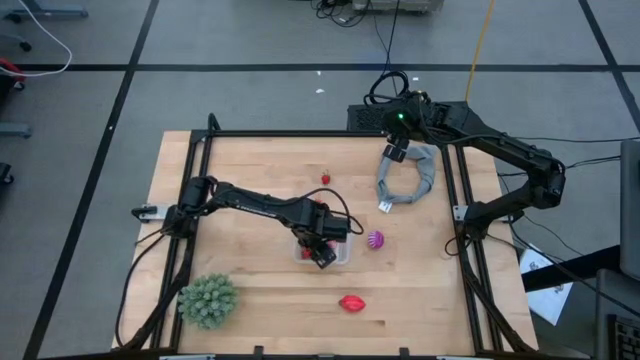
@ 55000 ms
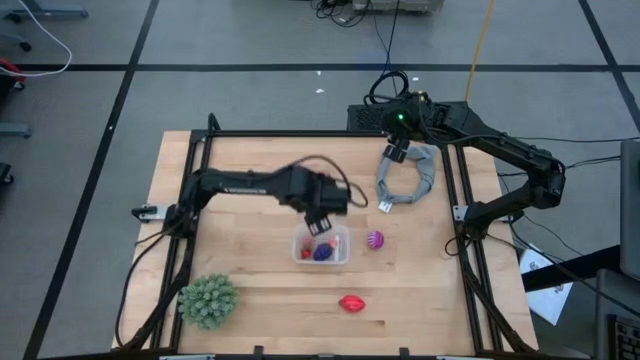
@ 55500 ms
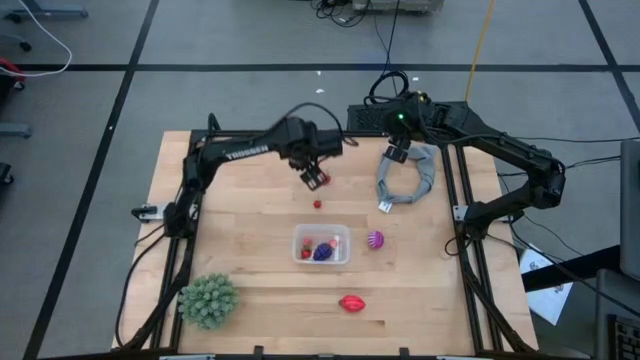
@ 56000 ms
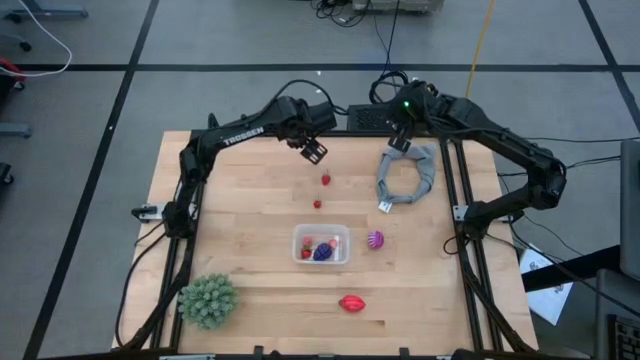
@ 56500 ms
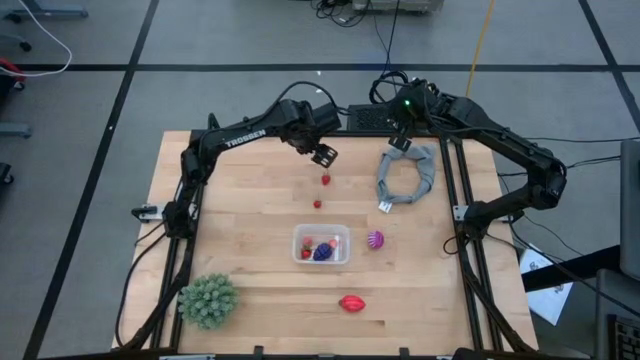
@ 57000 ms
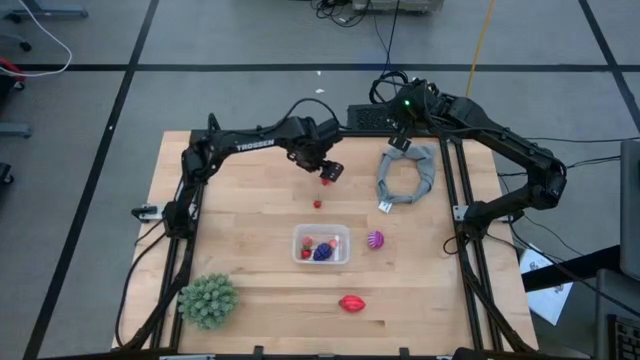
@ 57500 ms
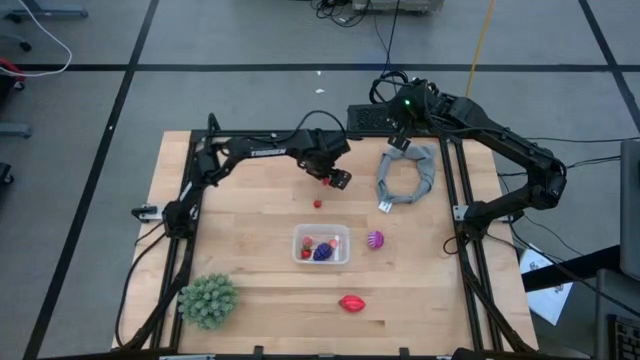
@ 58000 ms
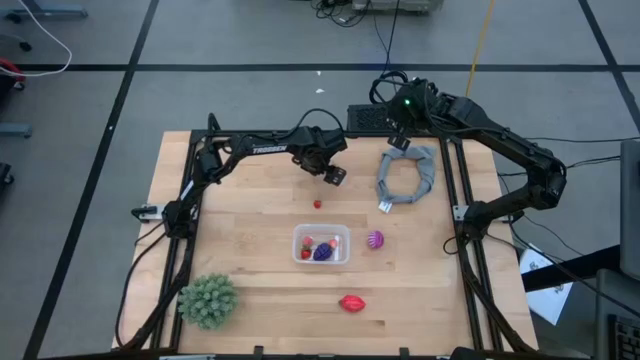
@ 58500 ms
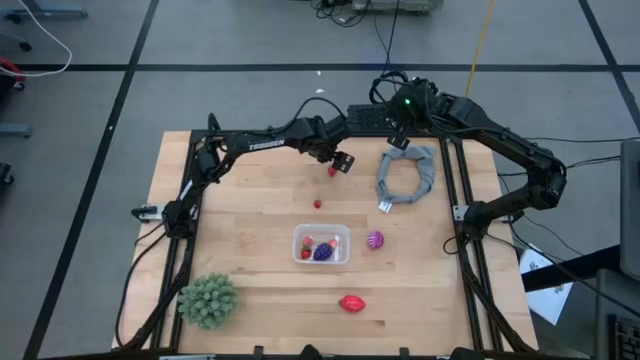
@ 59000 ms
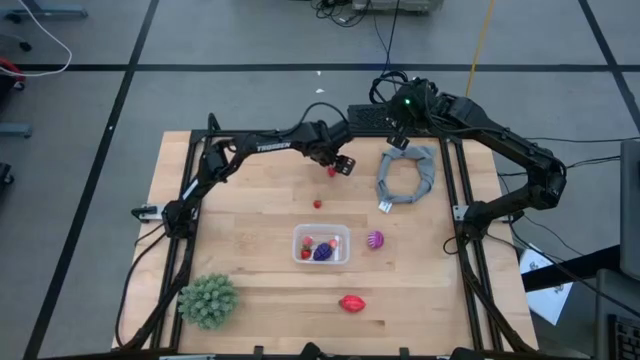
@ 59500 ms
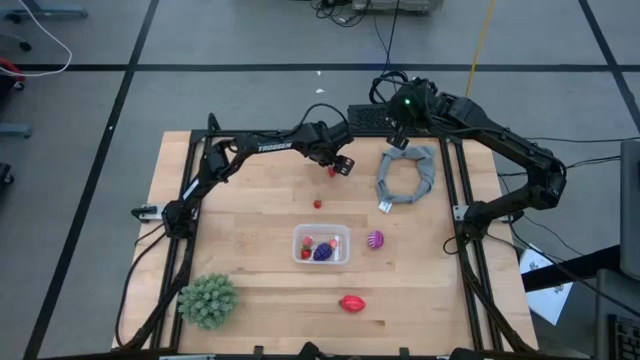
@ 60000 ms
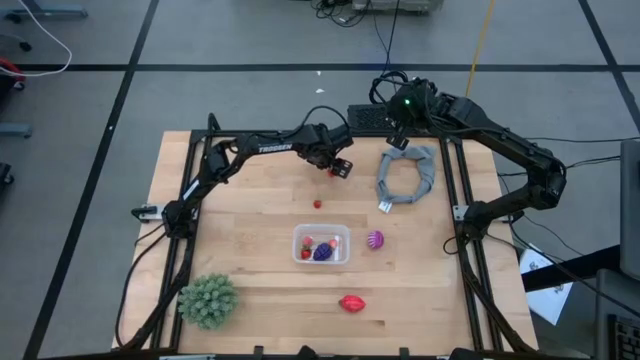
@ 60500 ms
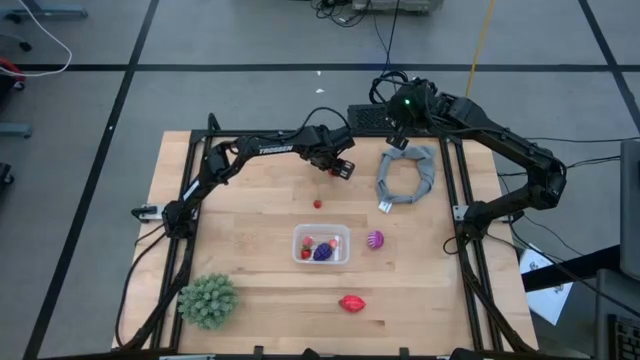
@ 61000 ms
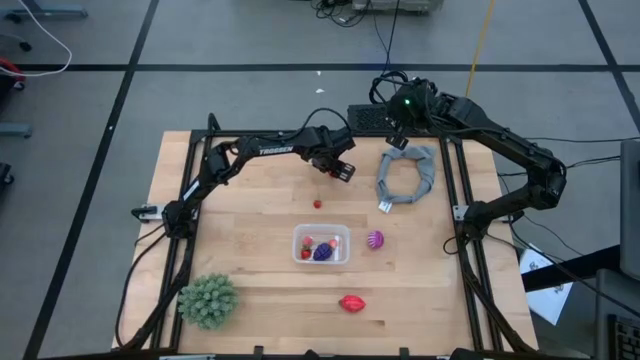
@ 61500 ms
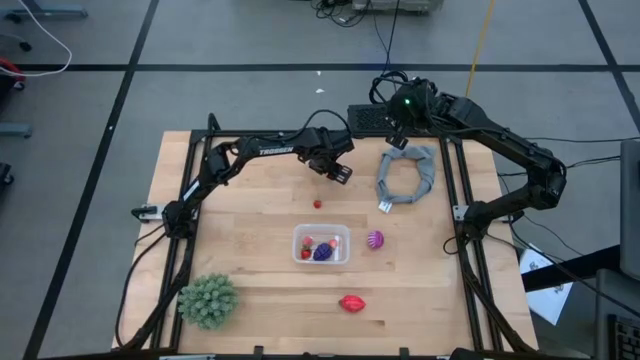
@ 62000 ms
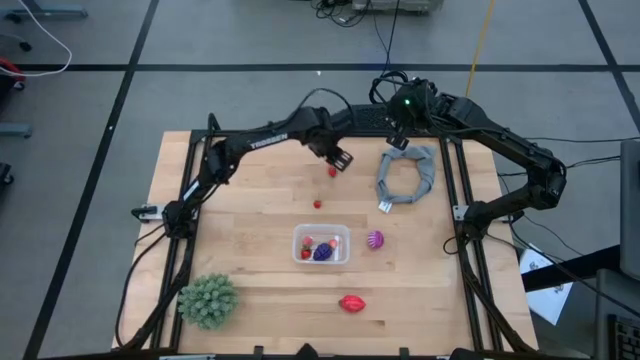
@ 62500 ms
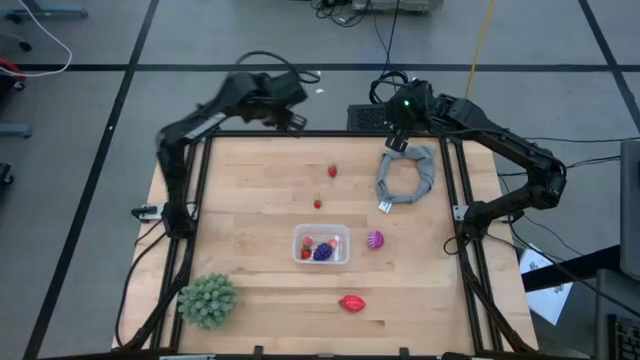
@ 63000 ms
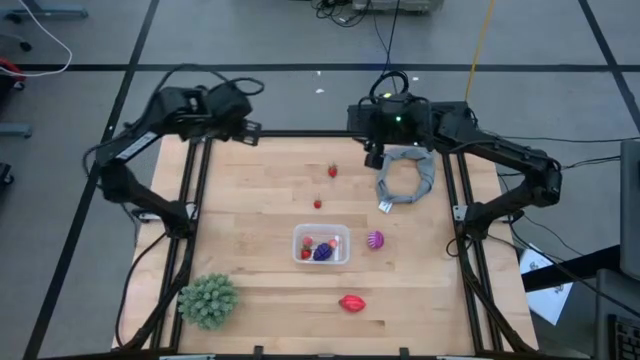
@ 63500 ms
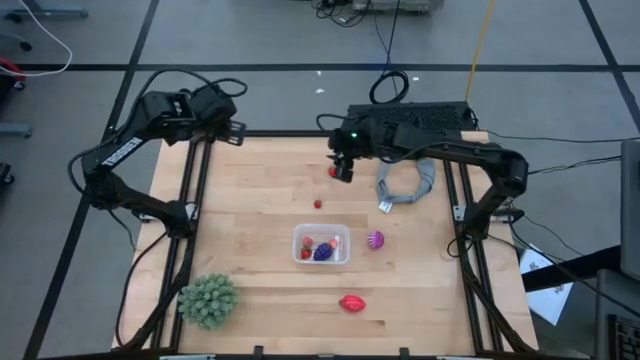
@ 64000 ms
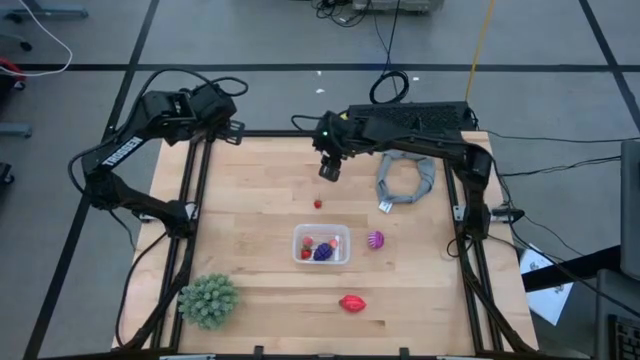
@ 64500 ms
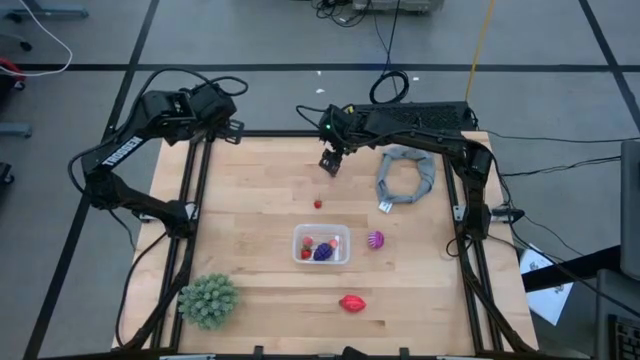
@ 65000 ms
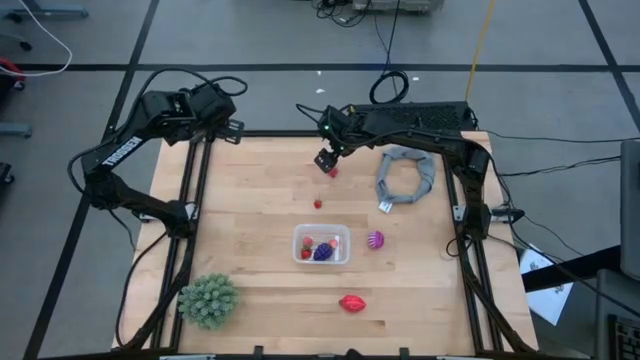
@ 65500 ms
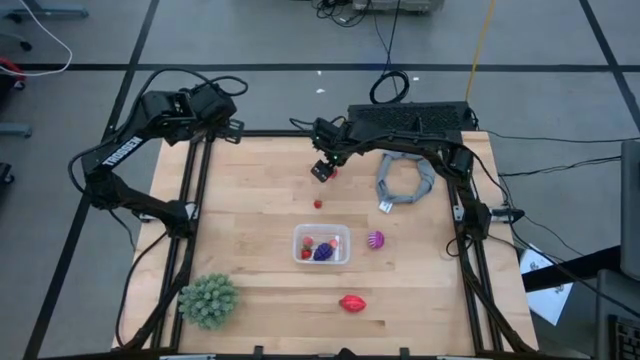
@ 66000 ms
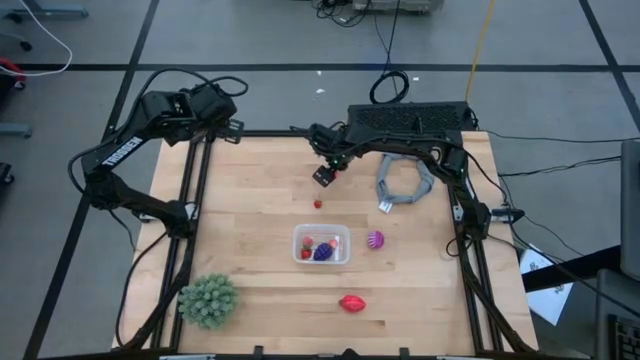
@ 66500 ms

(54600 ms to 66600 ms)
Task: Pick and placing Produce into tupperware
Put the top strawberry into the bin

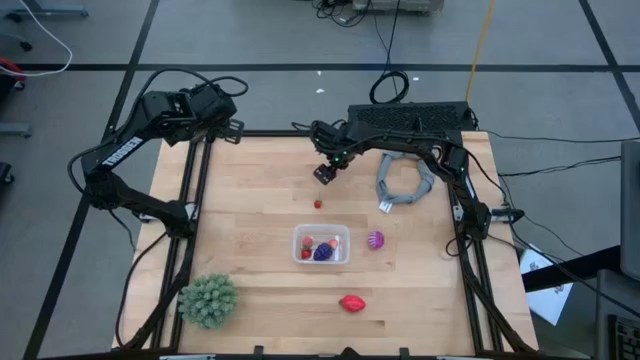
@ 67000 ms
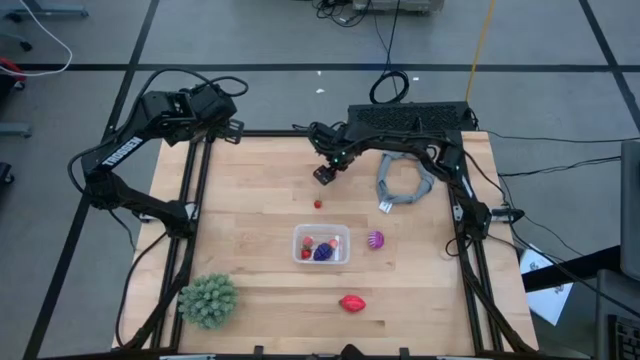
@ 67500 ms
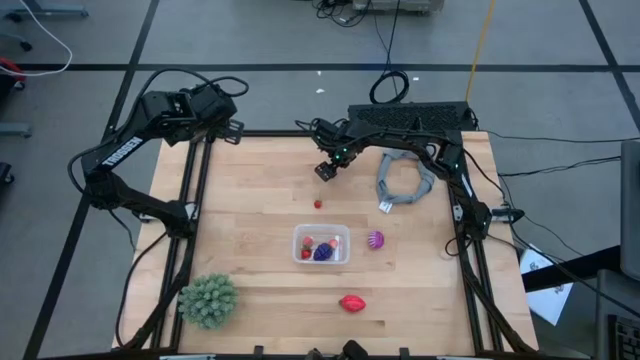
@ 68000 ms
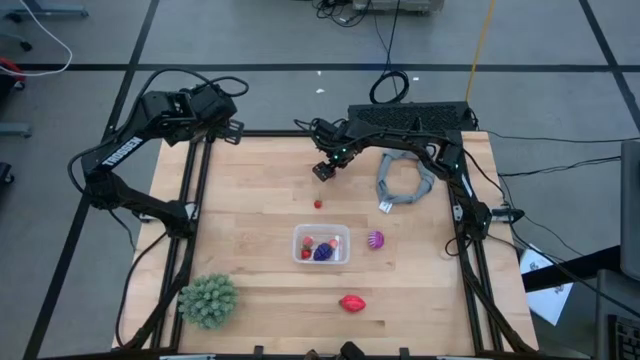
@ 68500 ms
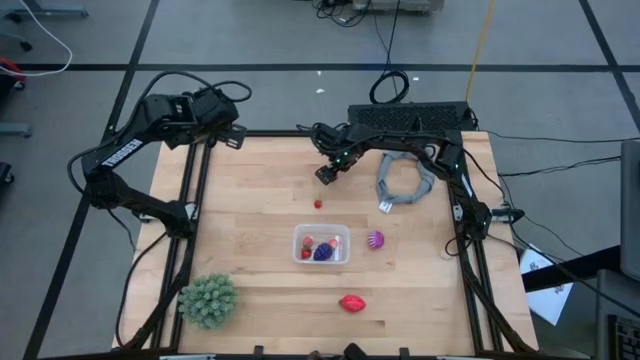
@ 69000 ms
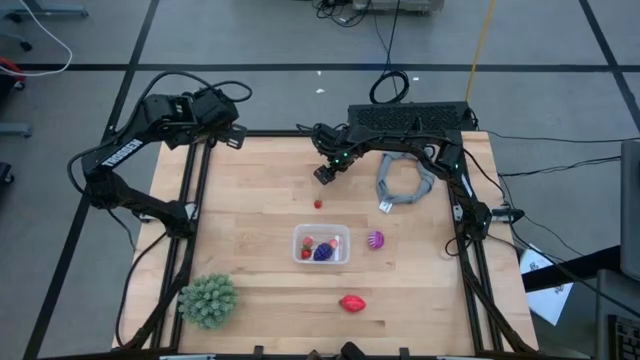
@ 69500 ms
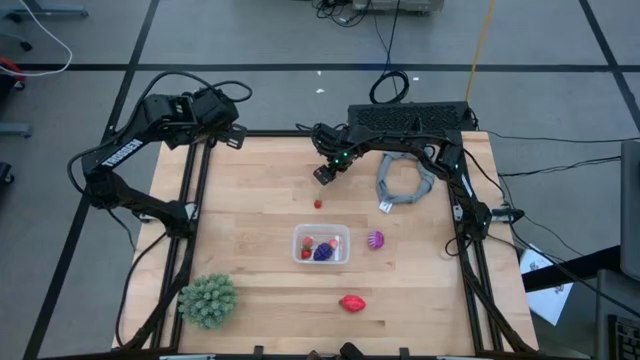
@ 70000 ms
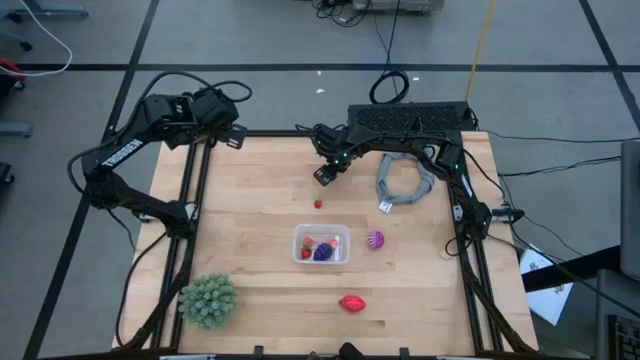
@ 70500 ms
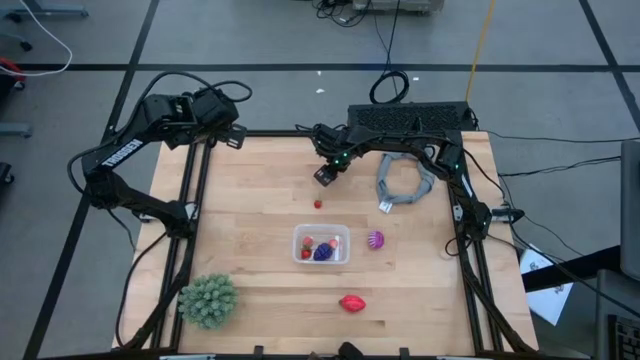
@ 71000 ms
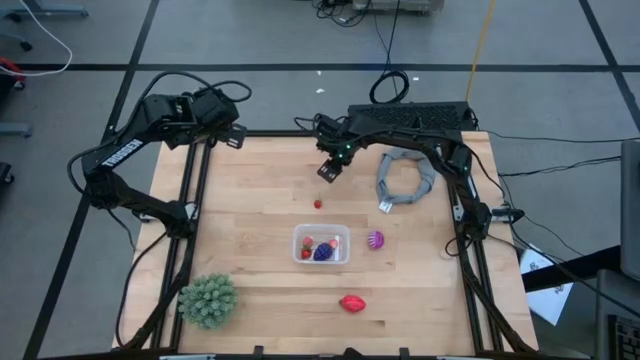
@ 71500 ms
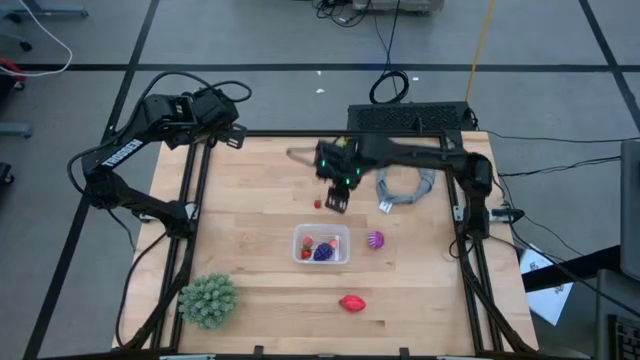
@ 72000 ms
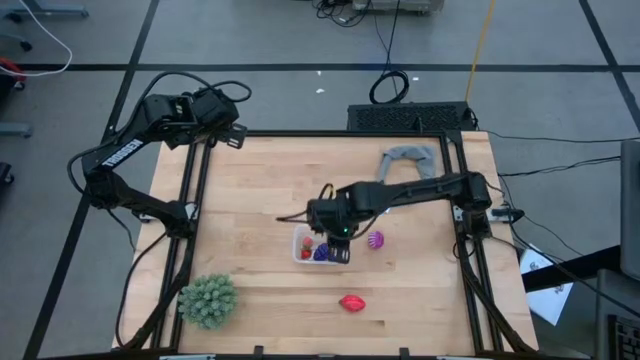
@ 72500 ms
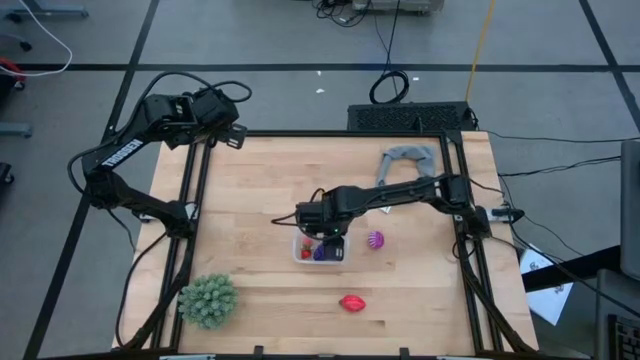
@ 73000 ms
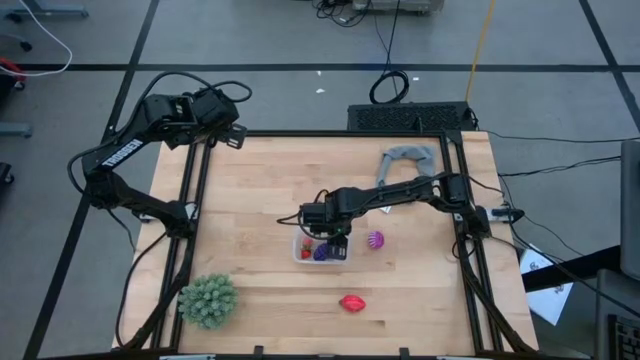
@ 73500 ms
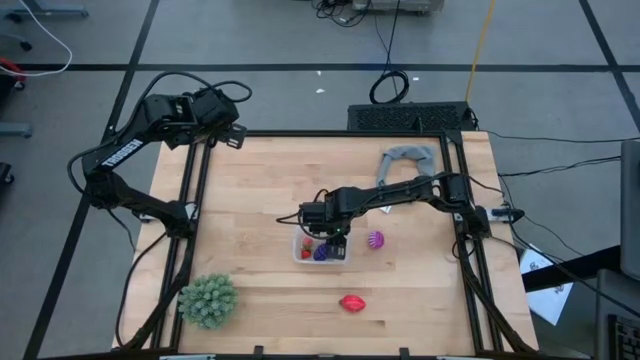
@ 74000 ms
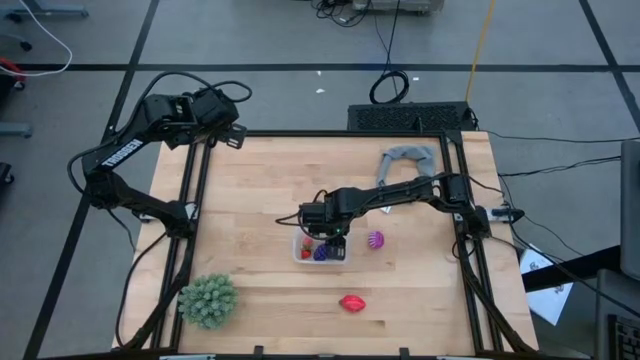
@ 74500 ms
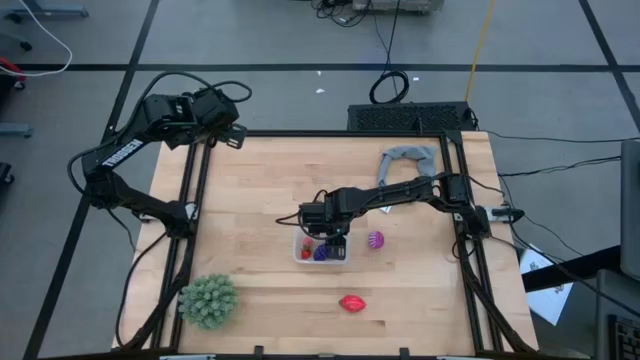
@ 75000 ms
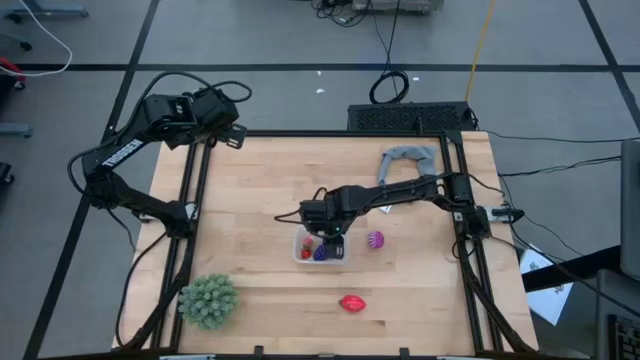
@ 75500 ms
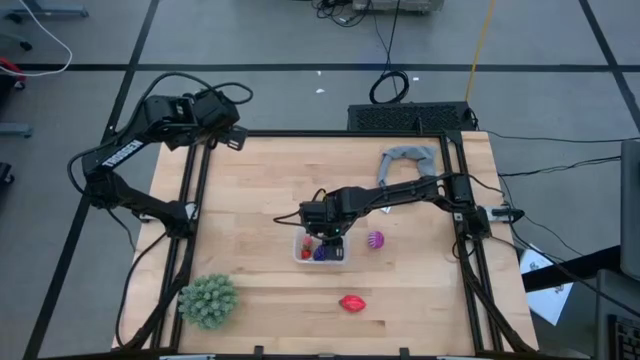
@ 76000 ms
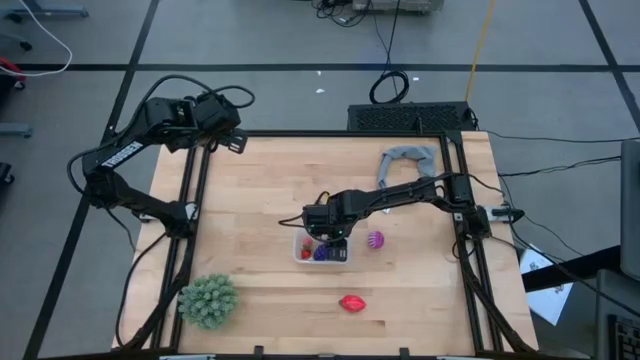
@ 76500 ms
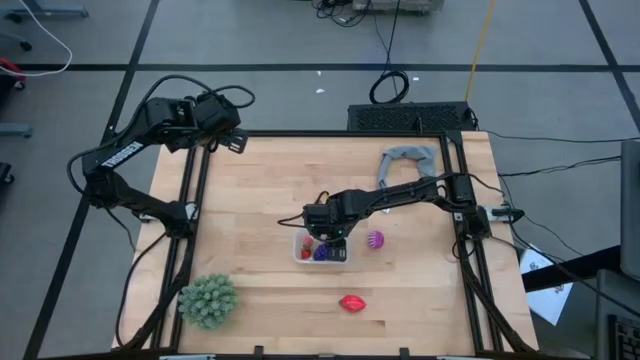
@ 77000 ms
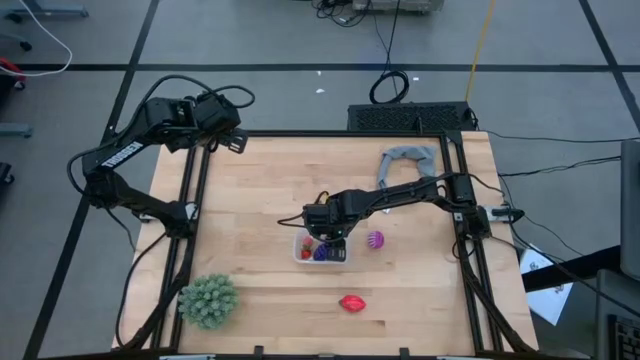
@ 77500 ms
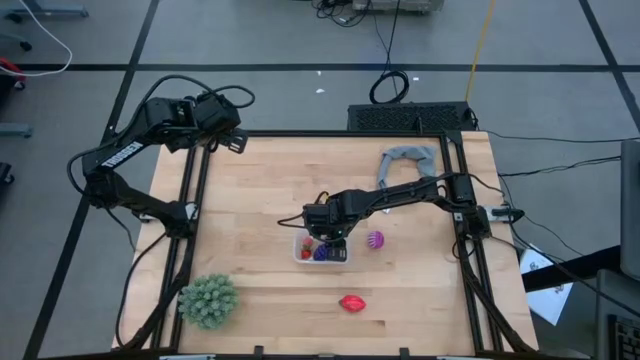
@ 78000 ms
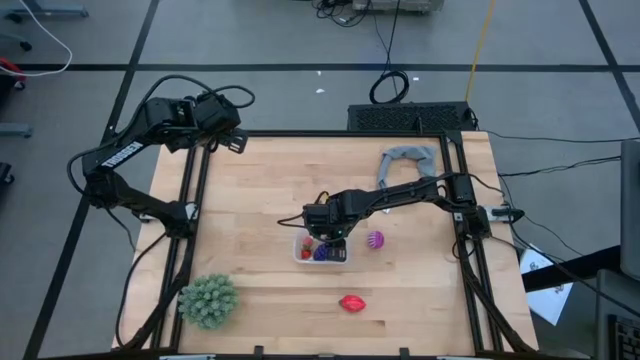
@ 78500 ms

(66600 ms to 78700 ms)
Put the top strawberry into the bin
